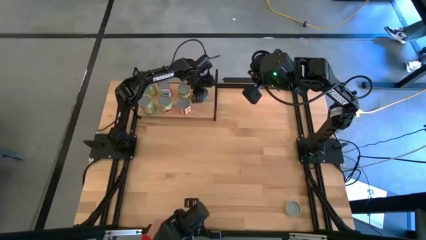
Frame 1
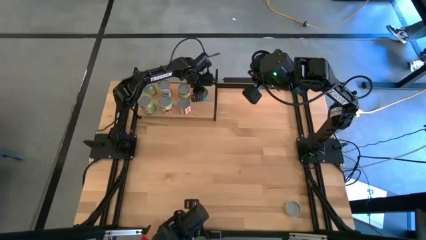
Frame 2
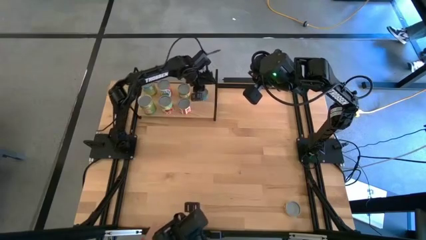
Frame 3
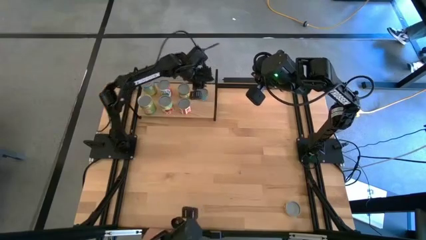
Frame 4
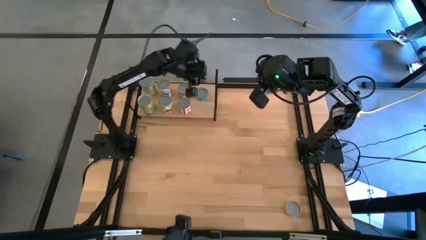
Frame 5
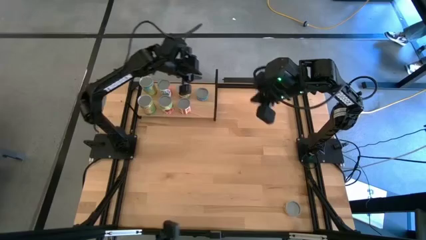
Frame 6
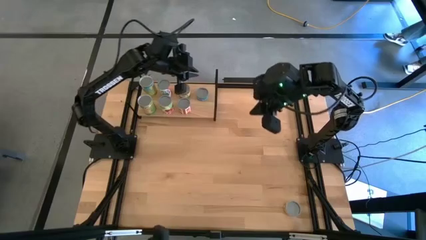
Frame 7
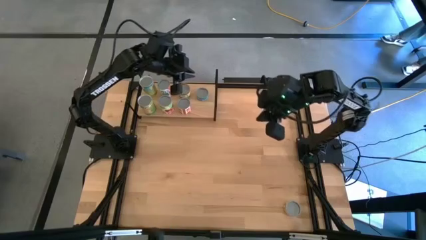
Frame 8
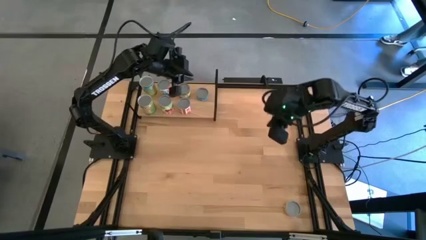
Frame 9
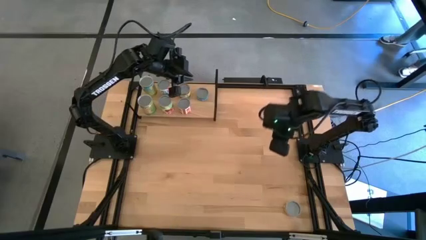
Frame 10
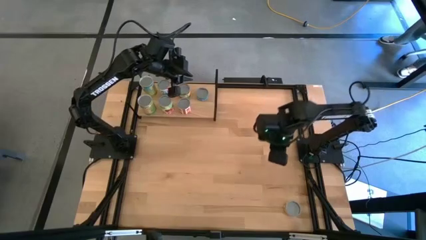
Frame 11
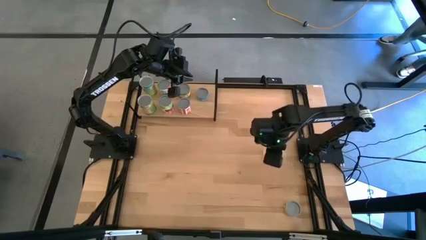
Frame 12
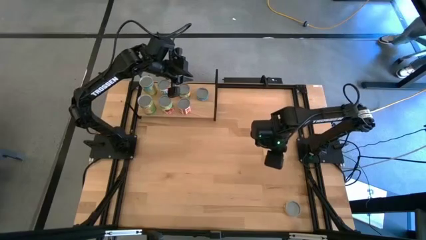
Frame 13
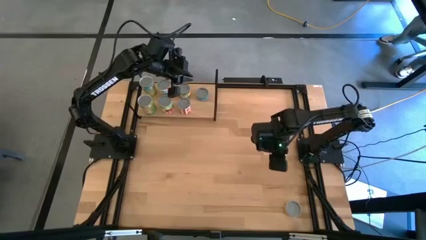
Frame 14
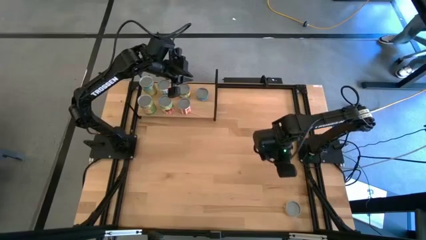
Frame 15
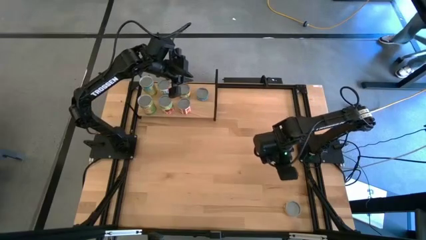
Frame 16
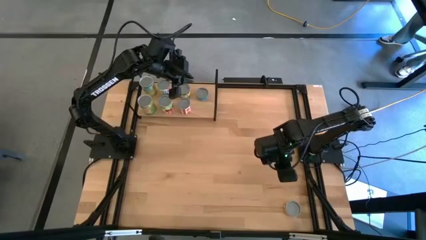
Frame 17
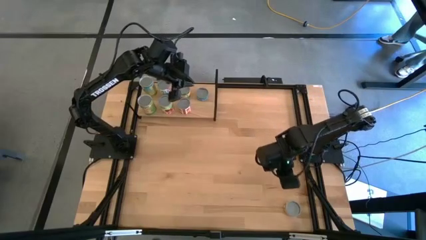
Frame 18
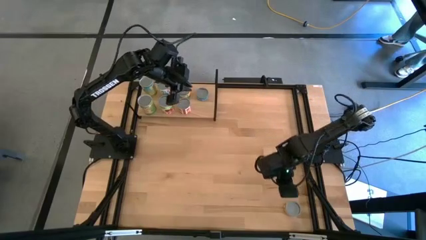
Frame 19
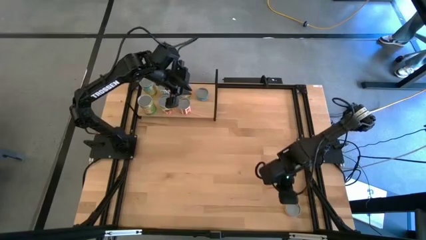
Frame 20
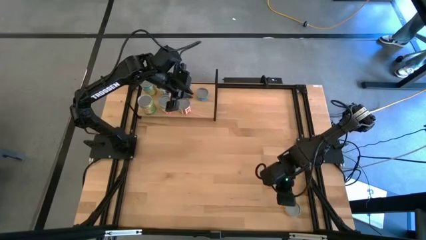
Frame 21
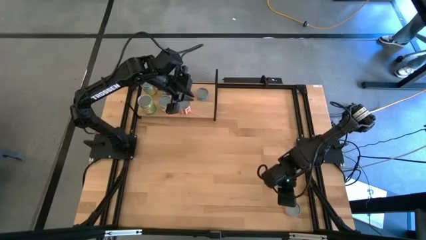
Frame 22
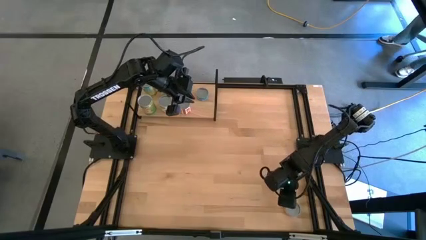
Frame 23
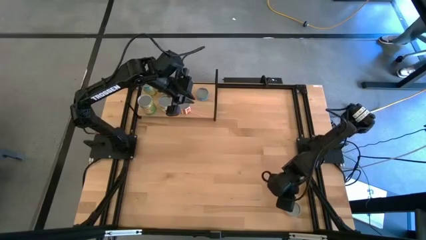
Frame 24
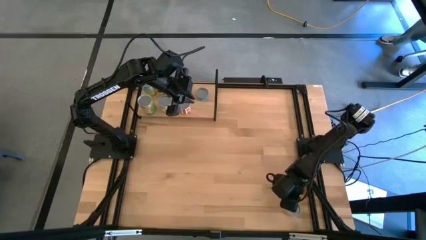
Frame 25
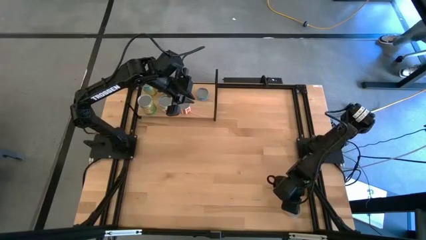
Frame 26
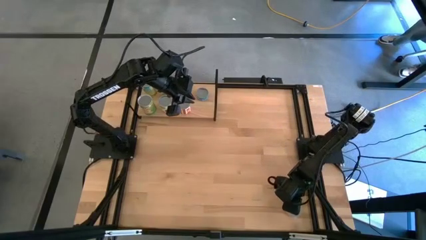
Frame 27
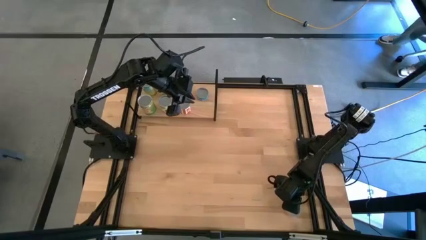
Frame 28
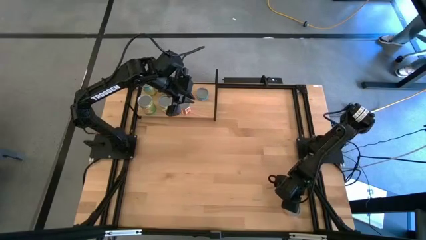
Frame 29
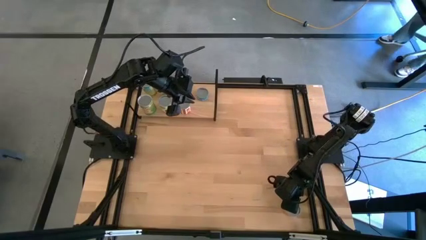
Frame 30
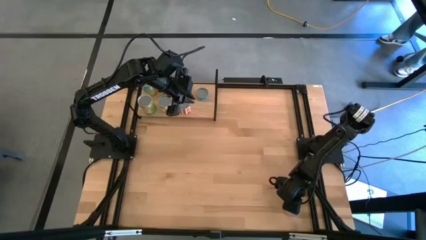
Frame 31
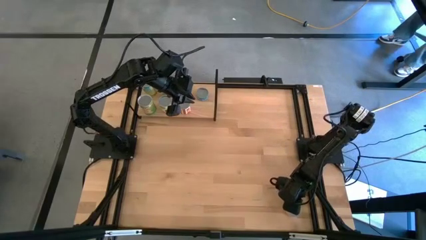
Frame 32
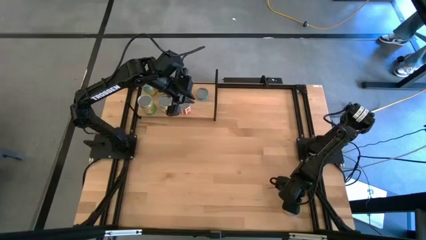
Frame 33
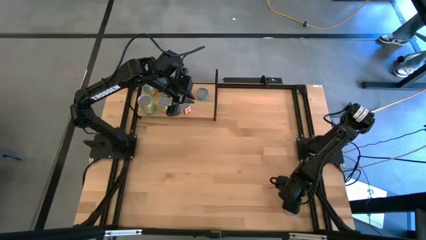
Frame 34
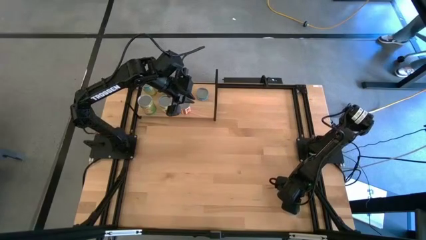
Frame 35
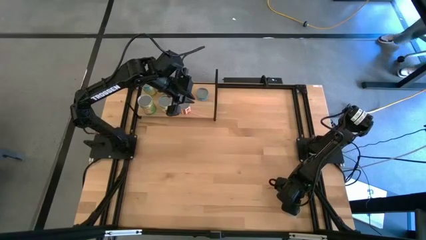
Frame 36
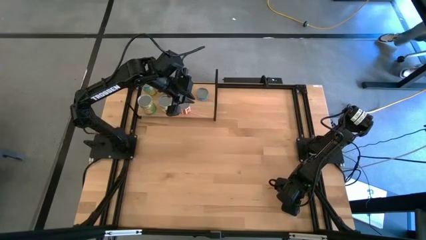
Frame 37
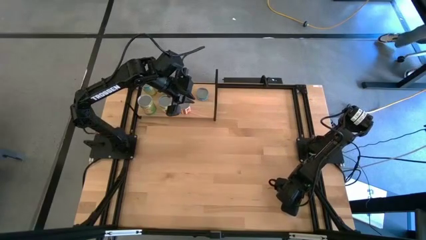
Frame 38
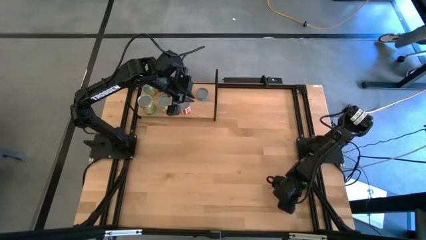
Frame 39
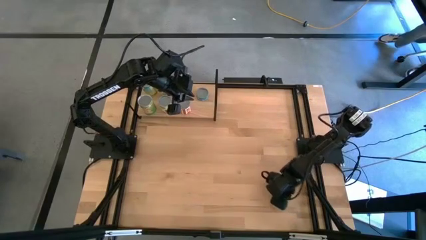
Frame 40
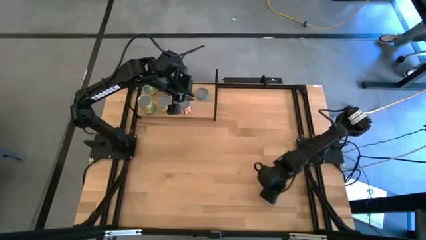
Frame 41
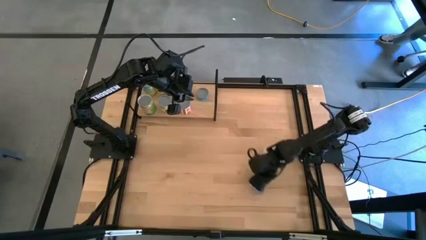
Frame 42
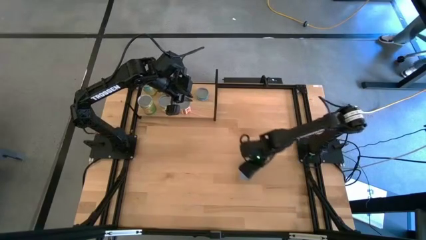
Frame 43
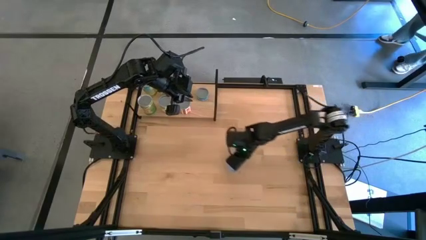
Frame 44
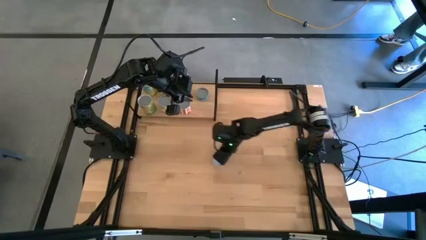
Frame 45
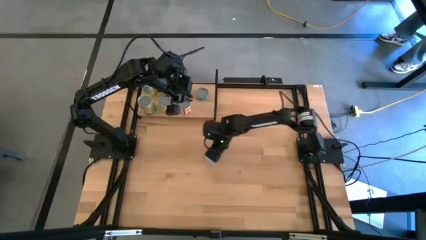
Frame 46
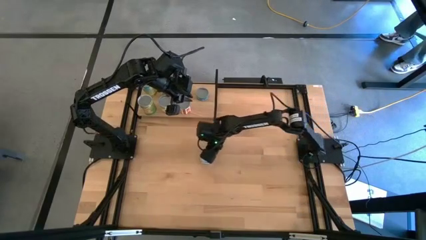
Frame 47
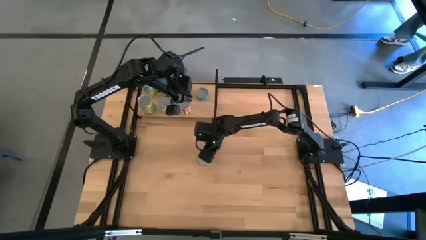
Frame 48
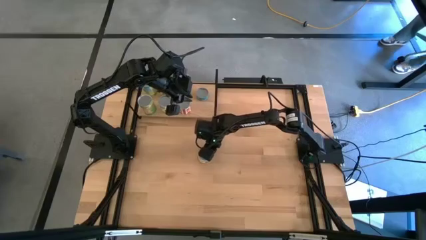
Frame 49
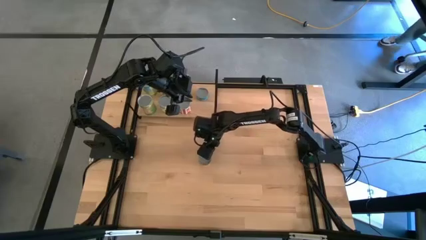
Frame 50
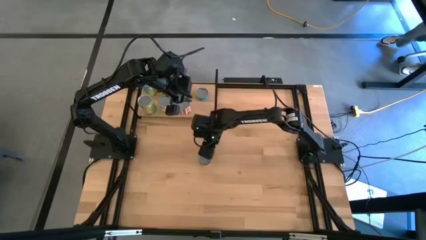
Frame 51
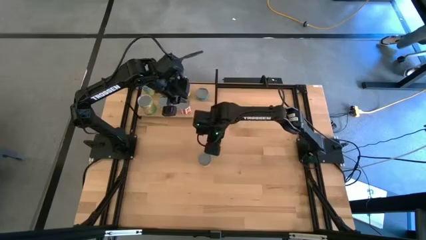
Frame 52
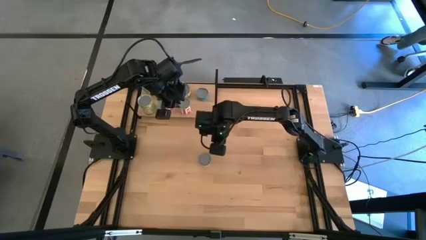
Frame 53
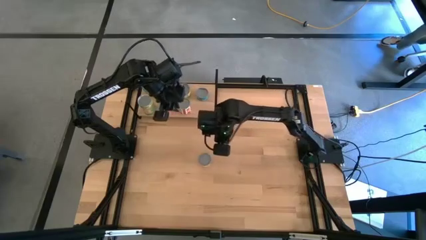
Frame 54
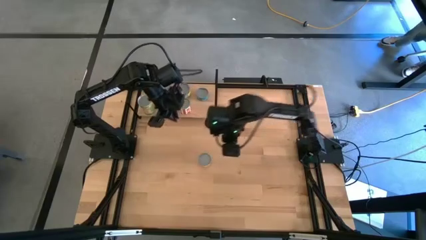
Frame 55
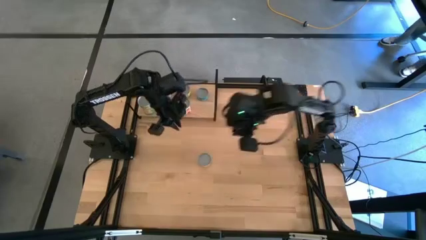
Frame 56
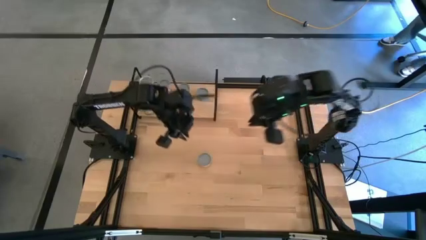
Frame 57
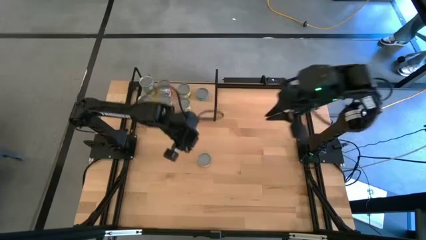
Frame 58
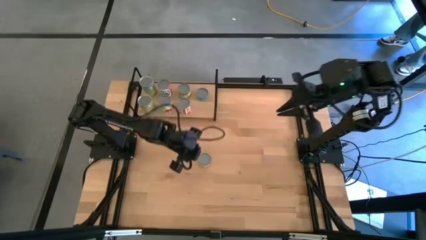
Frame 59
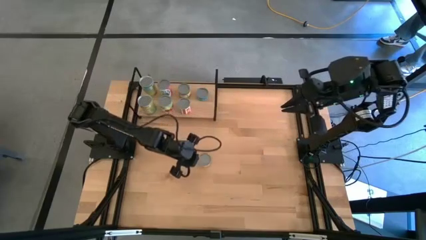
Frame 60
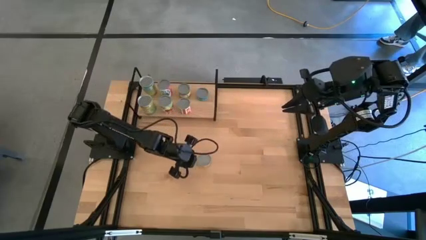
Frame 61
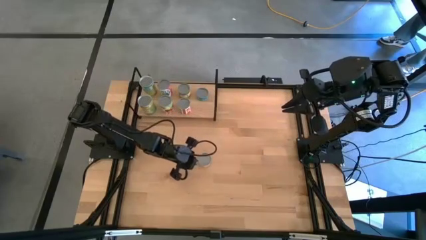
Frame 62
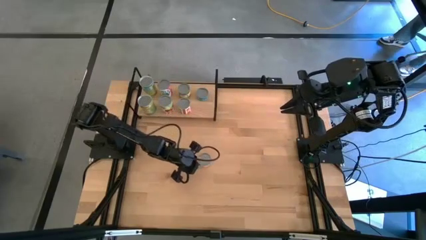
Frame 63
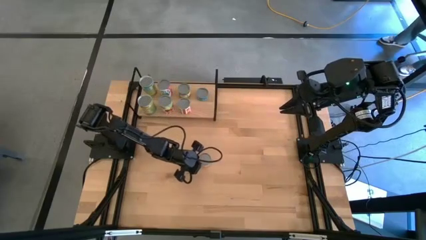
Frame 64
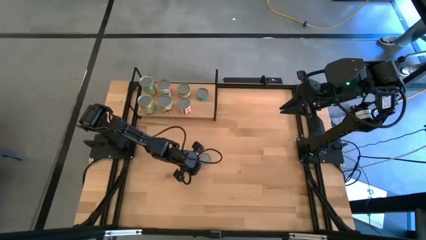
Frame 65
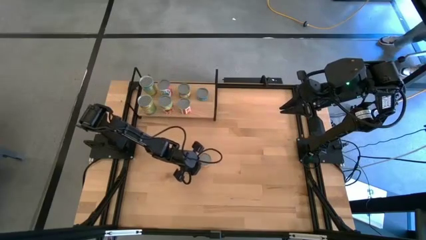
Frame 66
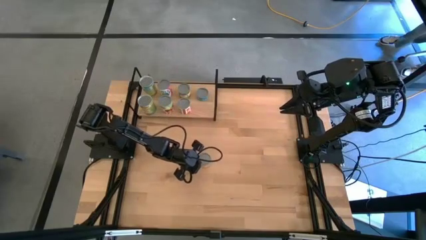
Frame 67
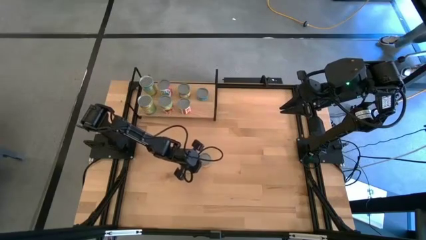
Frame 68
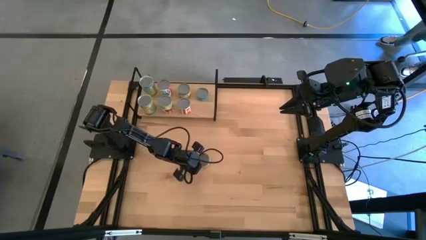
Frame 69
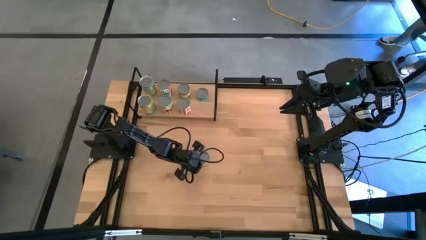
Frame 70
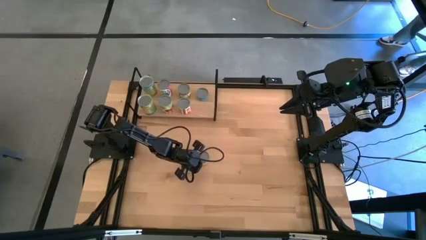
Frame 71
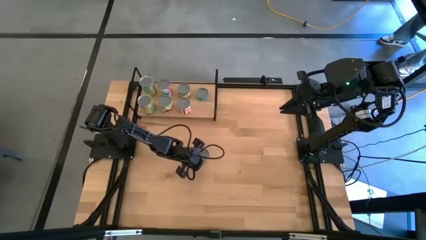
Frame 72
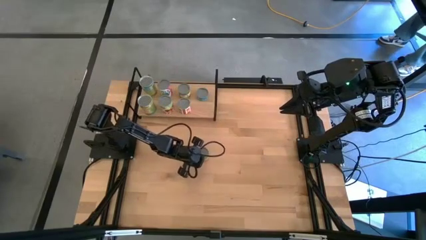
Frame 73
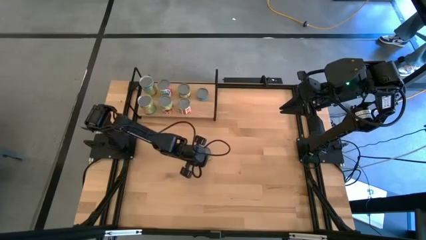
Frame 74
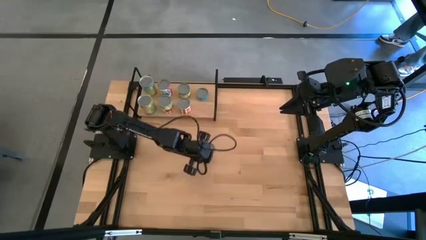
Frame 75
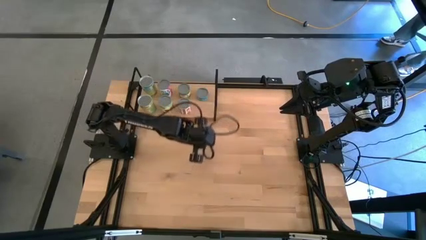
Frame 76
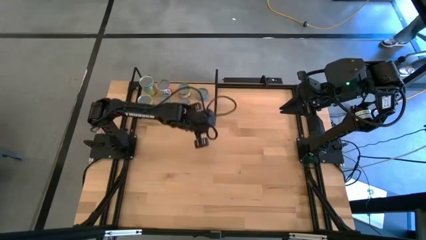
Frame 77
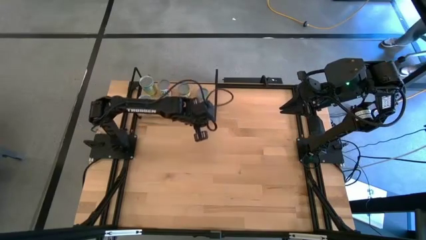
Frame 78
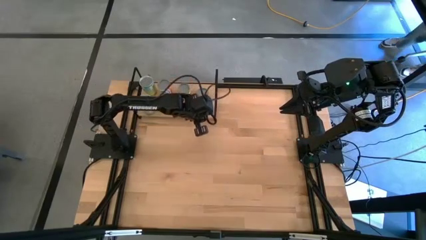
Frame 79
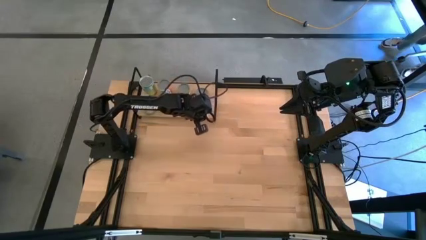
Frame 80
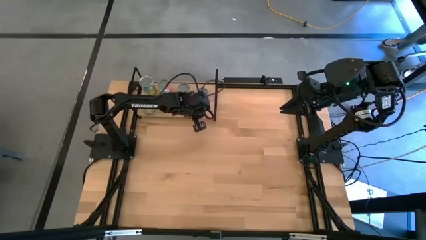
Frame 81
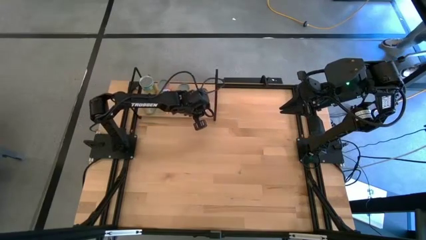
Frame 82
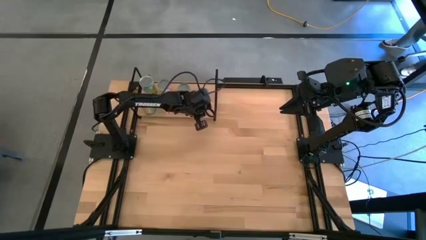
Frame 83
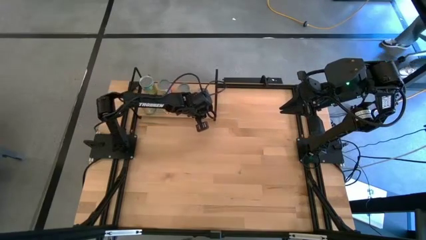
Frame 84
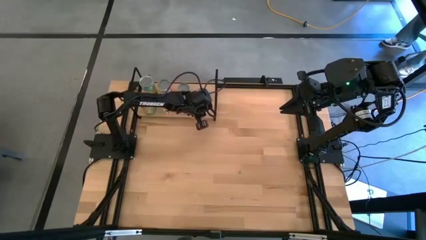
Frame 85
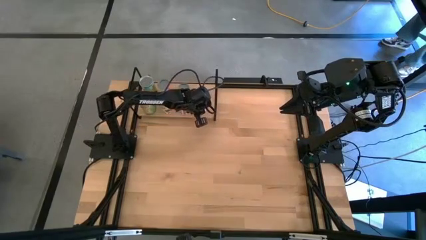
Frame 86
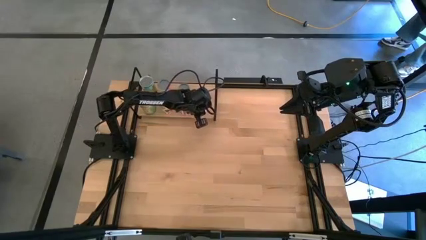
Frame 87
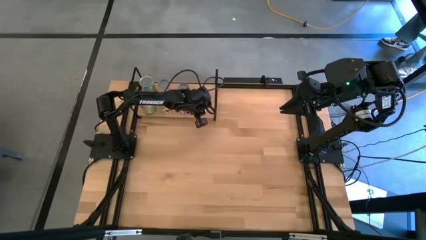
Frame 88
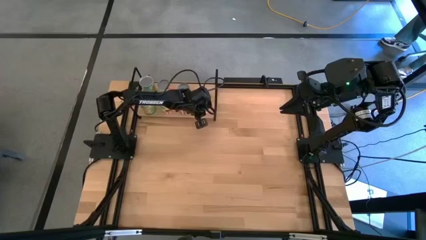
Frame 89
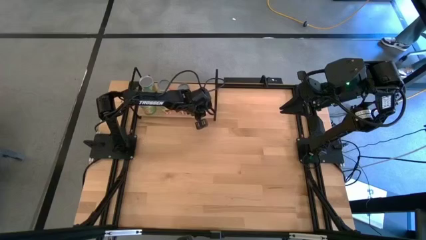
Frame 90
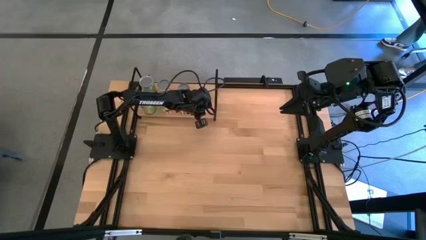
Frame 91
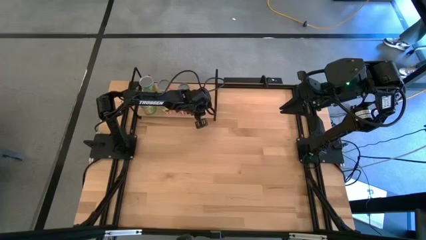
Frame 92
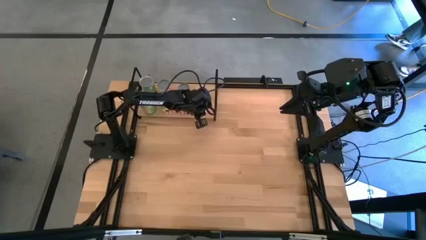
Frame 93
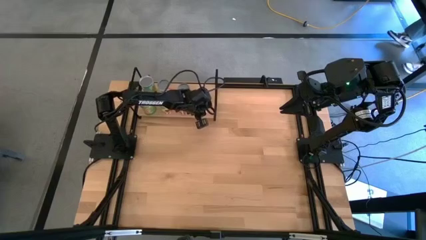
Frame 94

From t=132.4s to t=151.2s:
Task: Pick and place cans onto a shelf
Put the canned mushroom on the shelf
